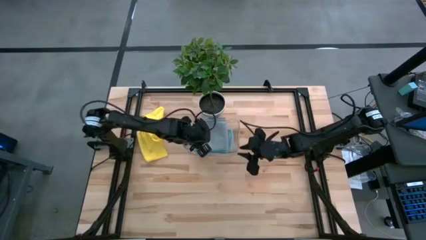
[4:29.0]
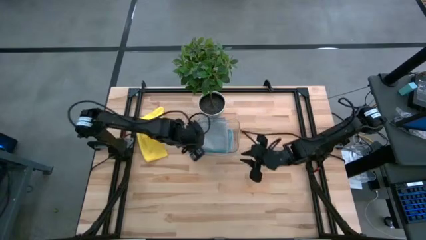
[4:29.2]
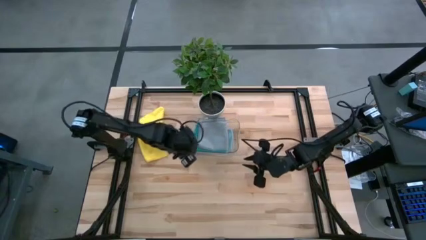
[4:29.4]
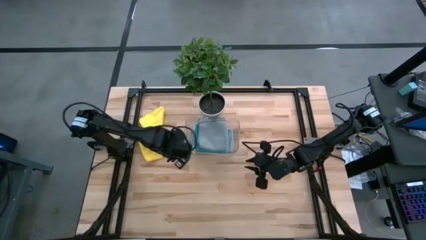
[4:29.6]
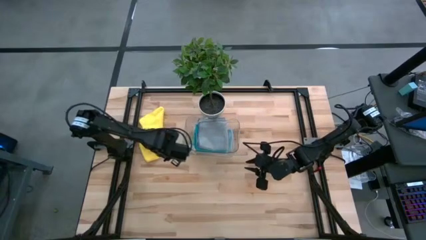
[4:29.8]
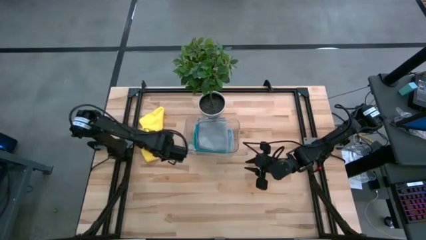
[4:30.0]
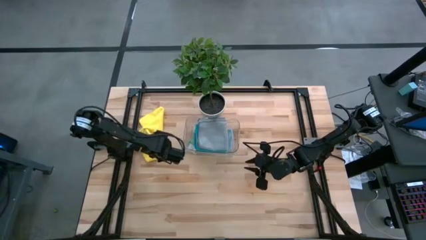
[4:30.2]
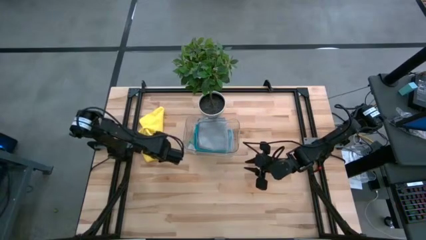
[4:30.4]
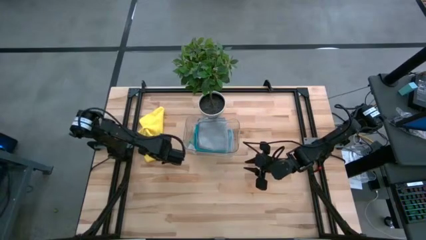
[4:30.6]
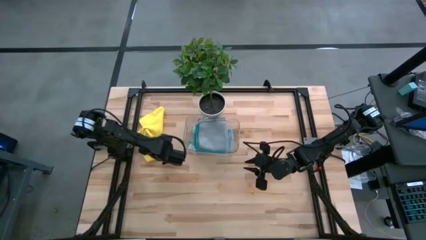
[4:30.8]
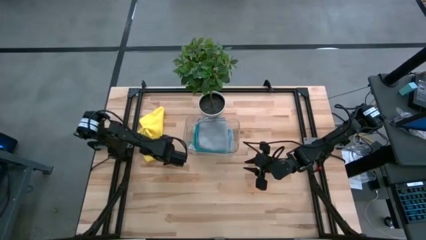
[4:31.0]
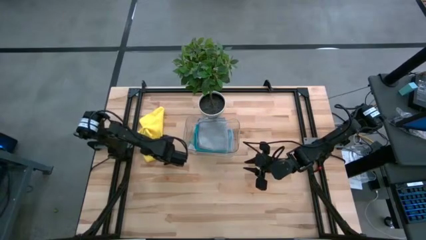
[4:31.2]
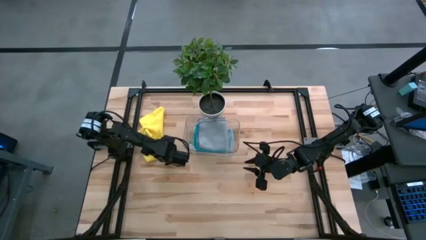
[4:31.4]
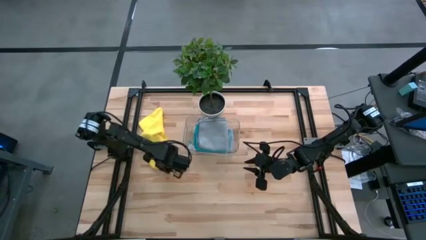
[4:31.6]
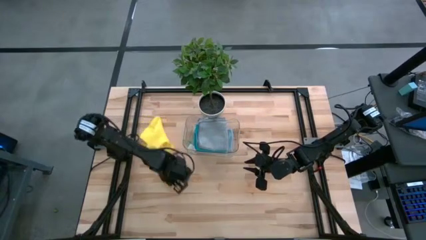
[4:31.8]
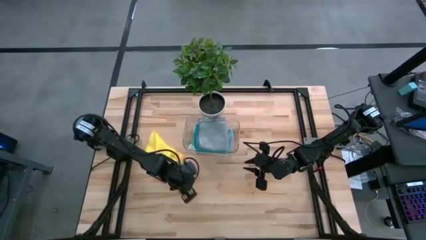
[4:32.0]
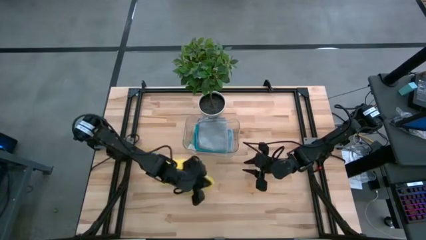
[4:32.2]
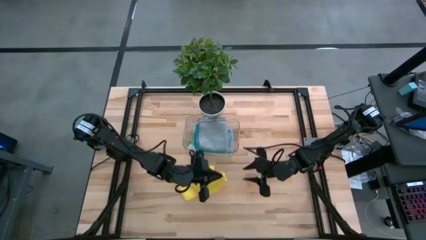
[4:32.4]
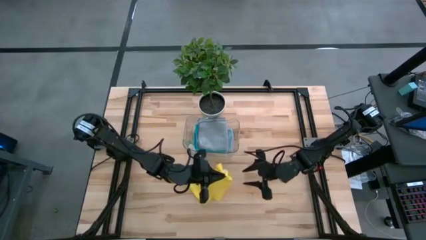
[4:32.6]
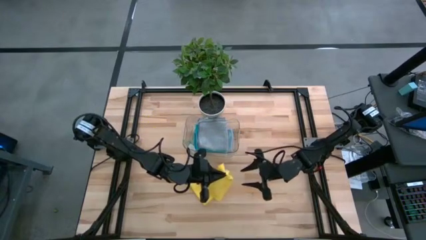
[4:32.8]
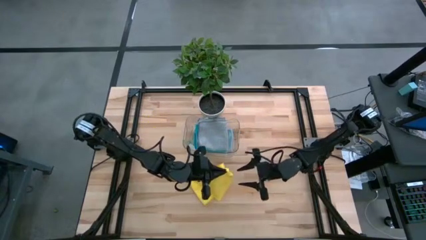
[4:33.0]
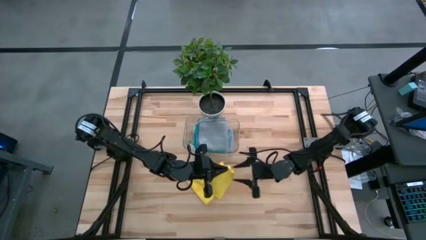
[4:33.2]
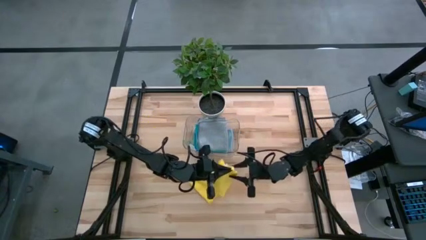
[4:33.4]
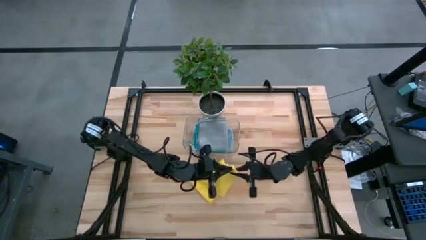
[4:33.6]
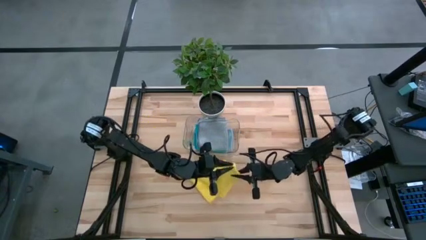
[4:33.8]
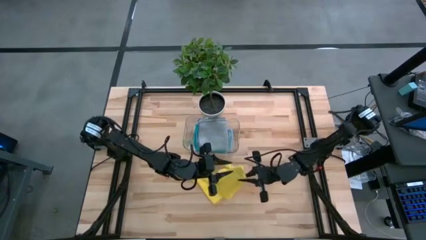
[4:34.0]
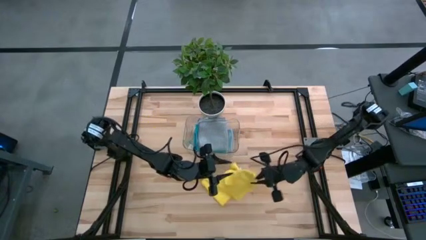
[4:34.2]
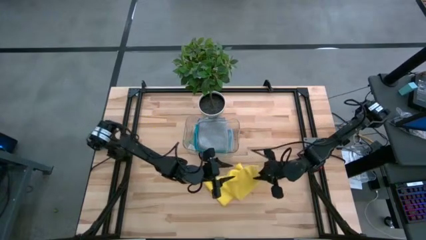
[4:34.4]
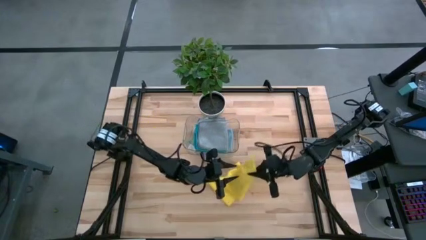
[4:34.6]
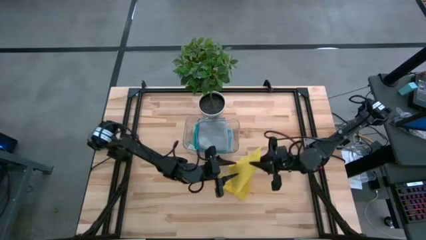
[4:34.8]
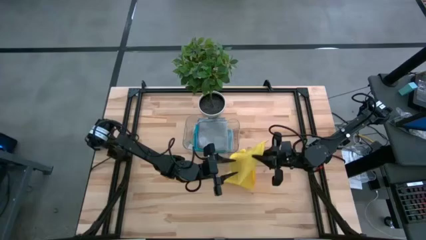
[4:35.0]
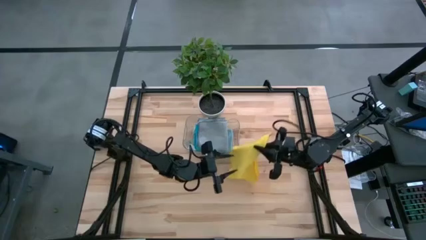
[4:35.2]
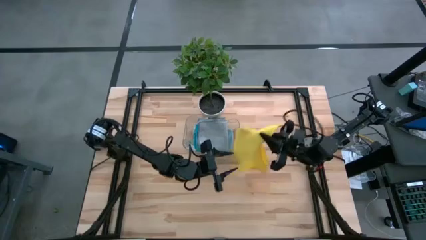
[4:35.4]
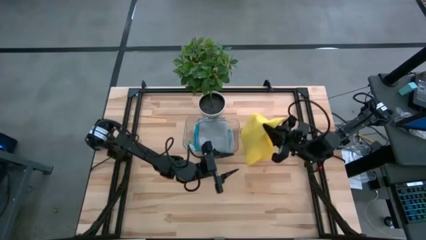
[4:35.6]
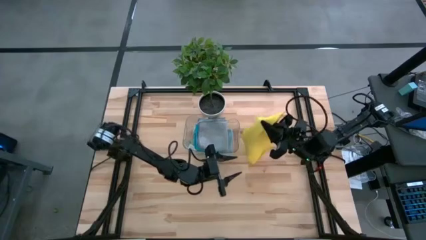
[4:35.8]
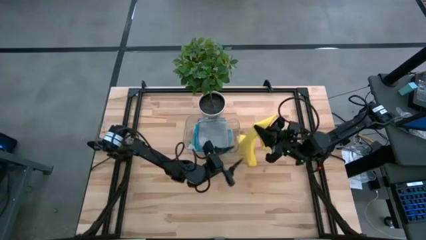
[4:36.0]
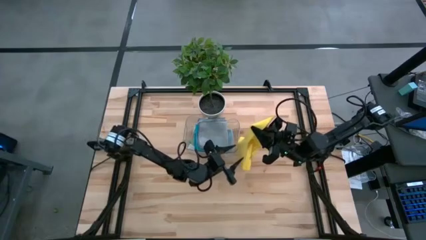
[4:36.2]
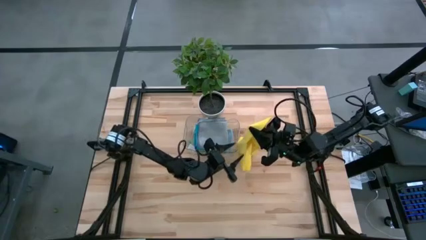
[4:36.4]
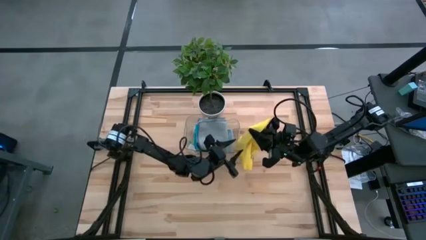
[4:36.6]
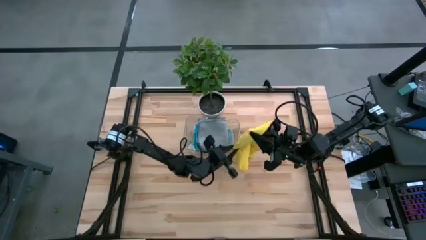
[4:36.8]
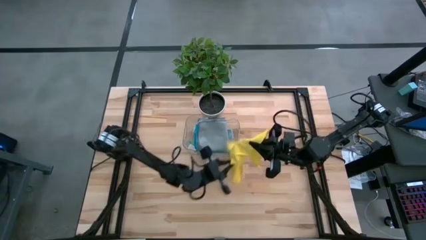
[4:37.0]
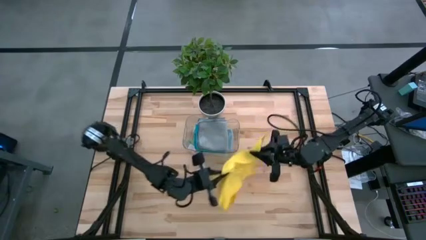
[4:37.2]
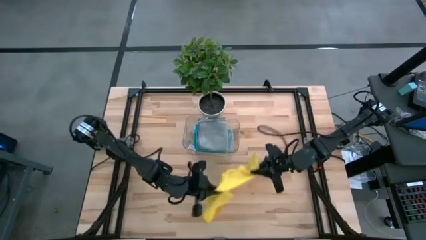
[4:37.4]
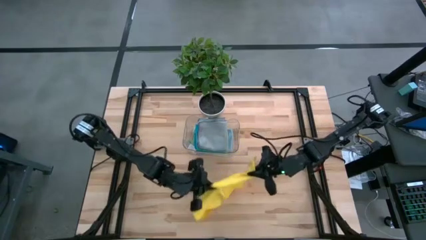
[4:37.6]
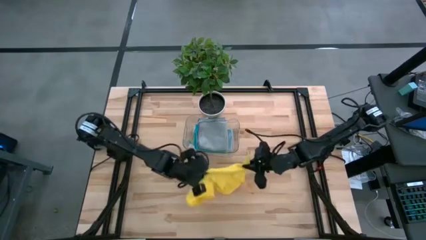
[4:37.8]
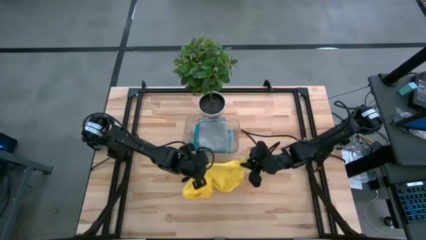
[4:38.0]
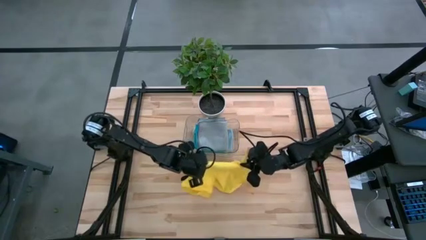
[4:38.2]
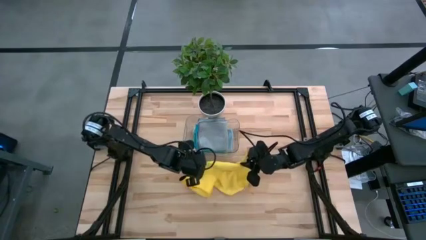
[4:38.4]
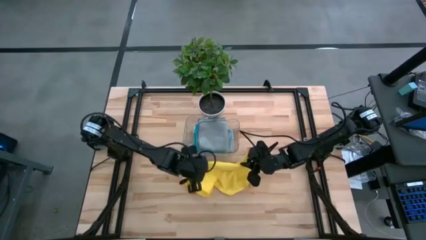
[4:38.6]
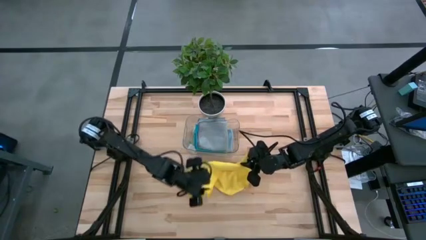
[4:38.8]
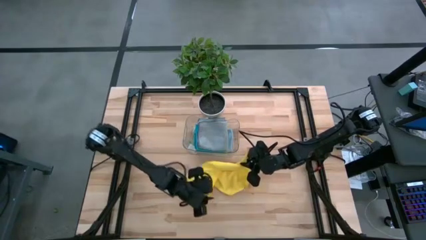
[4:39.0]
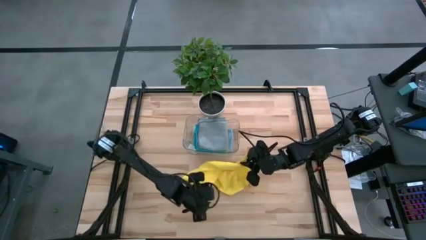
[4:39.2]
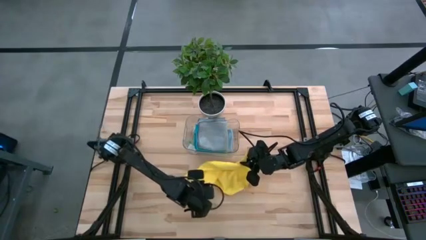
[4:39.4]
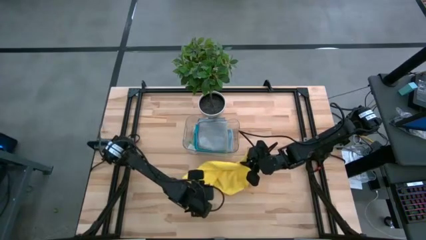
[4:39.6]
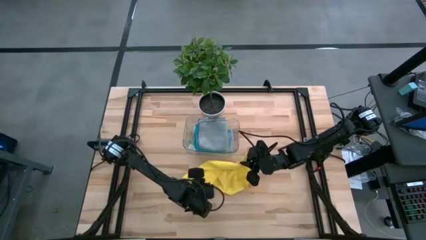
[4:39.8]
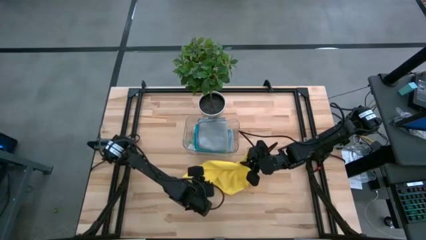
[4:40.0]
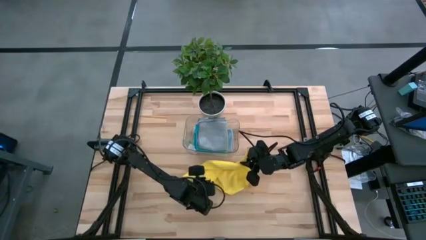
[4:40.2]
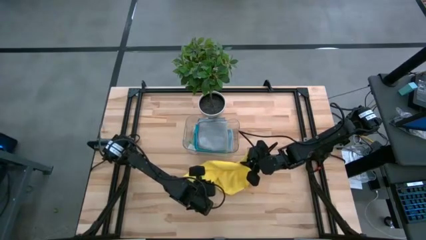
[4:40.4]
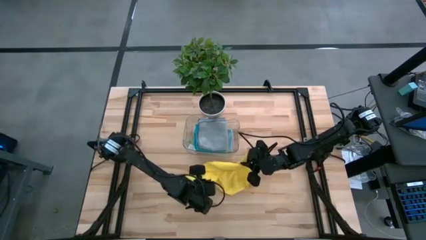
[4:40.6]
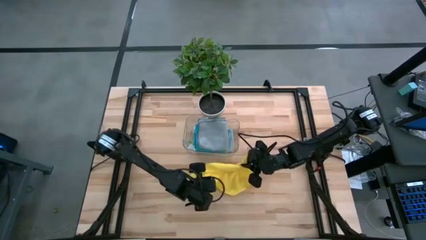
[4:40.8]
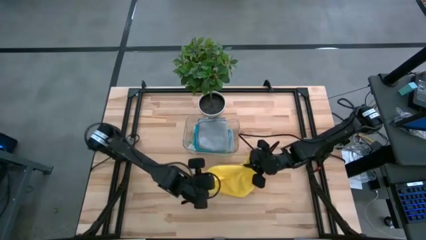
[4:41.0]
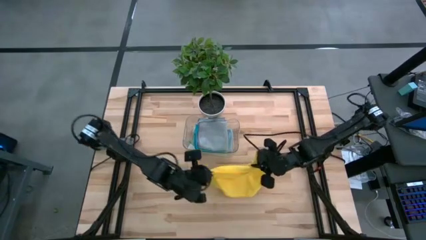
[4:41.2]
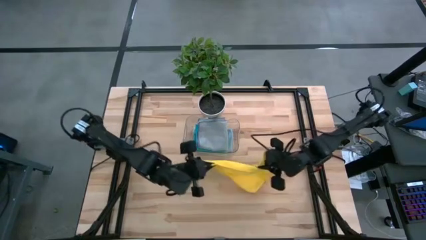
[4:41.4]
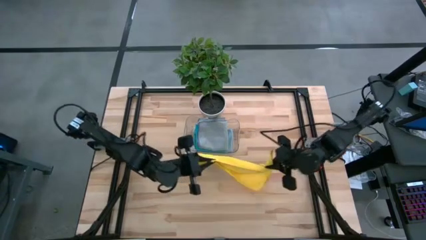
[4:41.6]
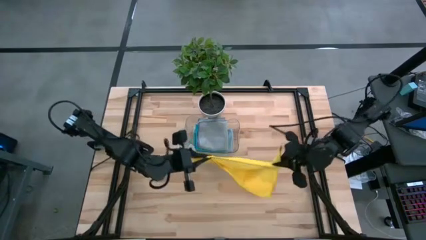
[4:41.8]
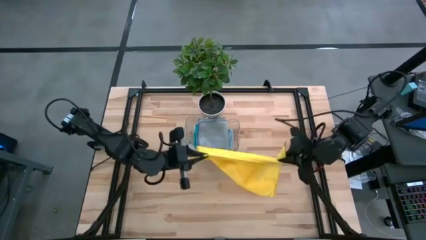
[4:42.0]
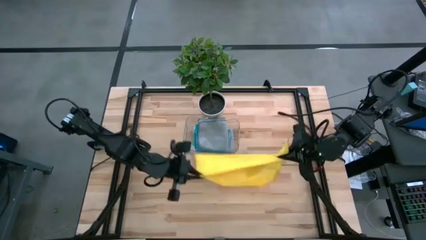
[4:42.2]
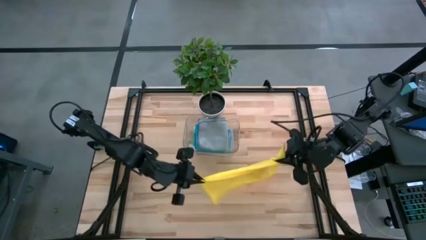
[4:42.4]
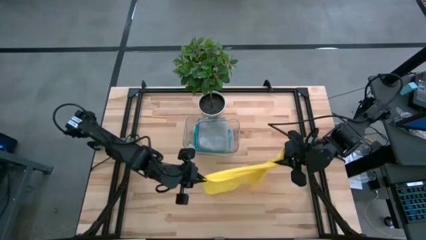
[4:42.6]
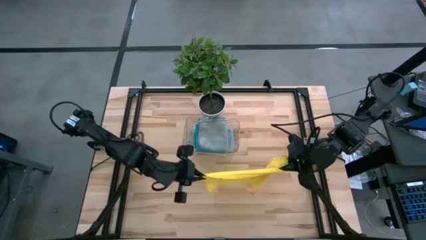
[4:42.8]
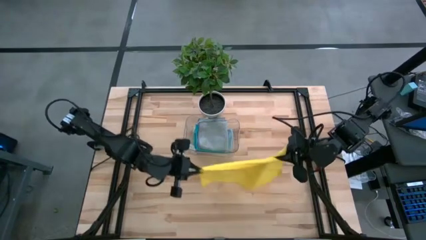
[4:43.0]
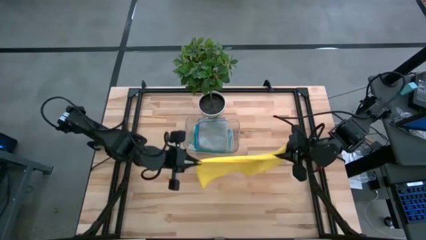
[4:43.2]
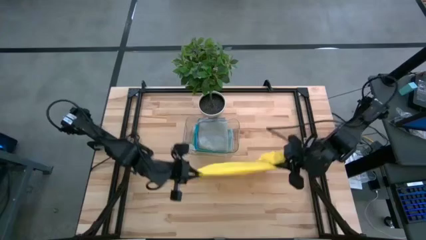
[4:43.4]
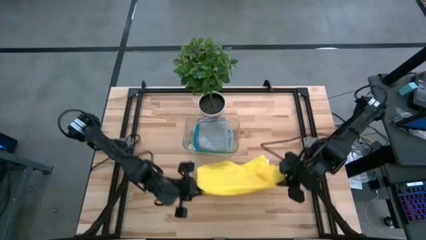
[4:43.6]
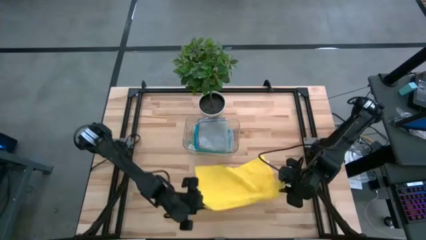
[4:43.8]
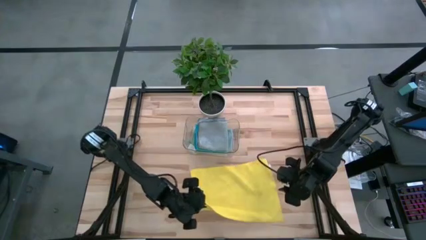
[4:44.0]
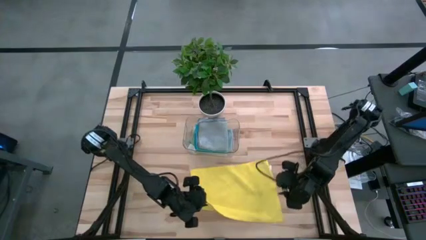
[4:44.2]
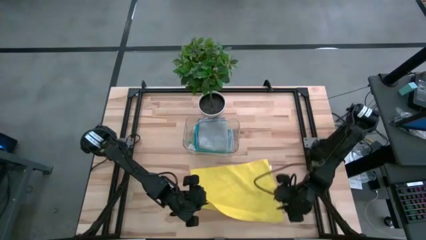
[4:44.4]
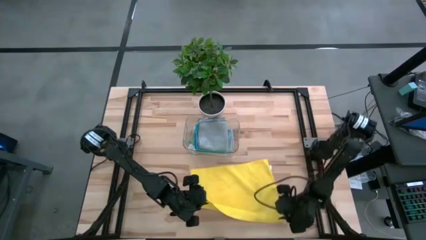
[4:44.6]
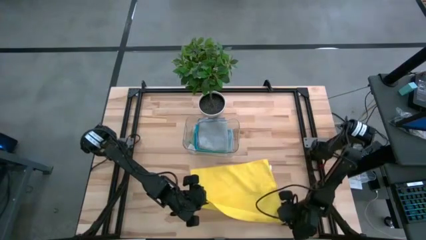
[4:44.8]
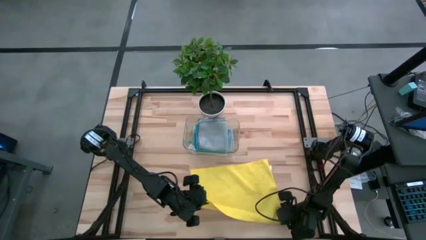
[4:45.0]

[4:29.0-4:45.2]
Task: Fold microfiber towels
Fold the yellow microfiber cloth
